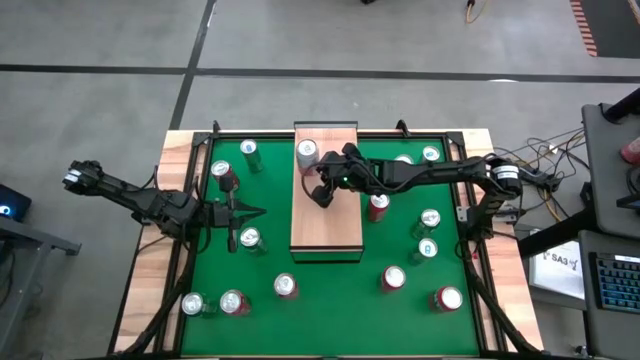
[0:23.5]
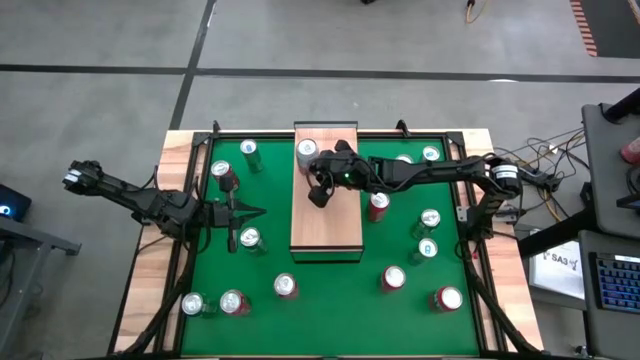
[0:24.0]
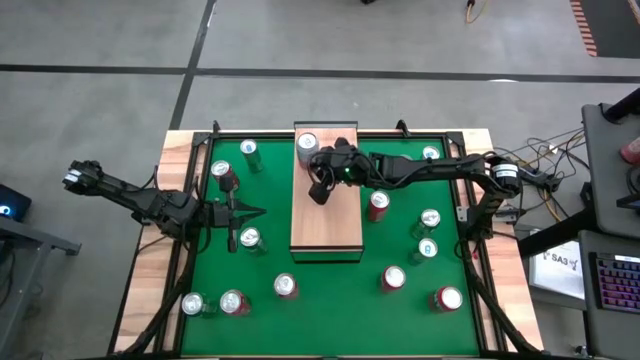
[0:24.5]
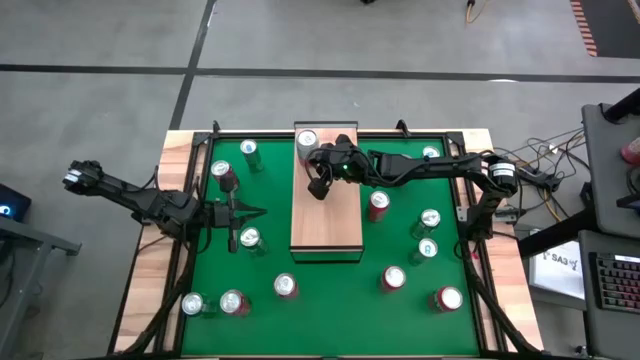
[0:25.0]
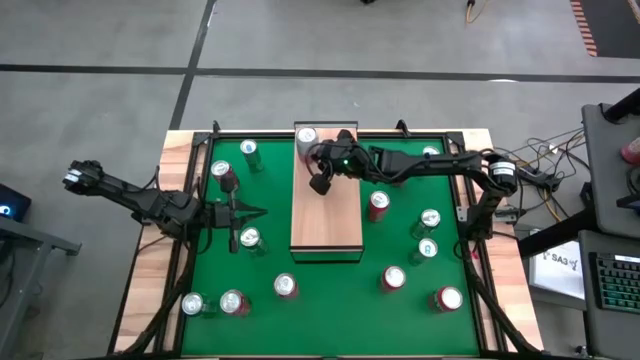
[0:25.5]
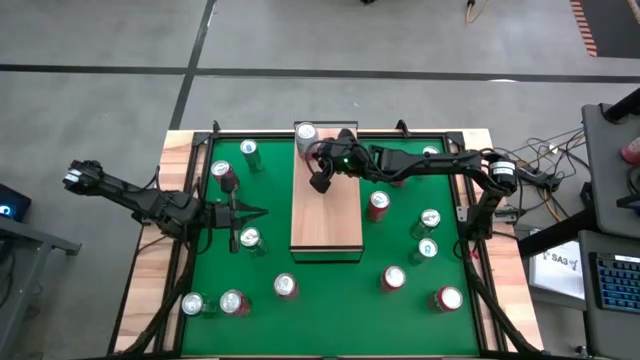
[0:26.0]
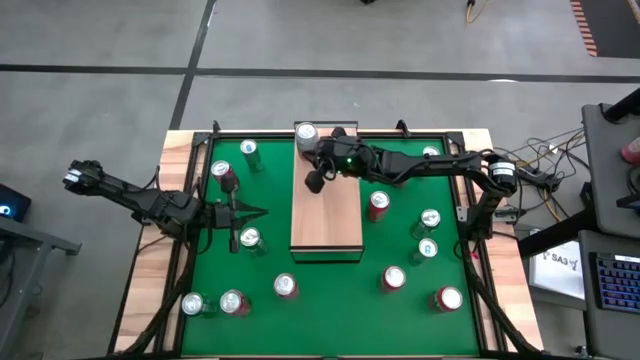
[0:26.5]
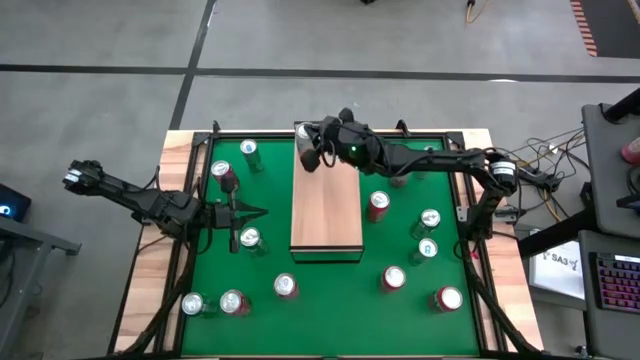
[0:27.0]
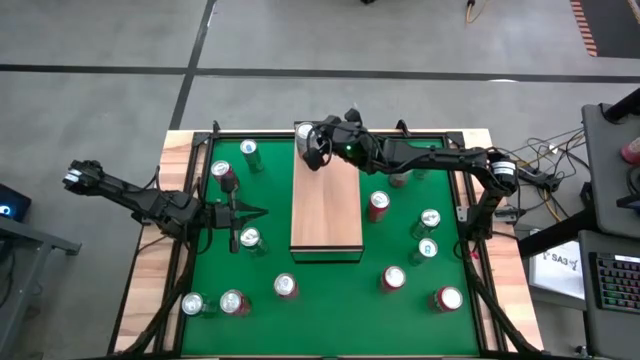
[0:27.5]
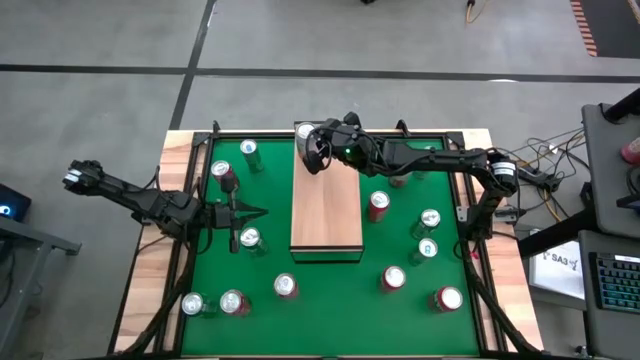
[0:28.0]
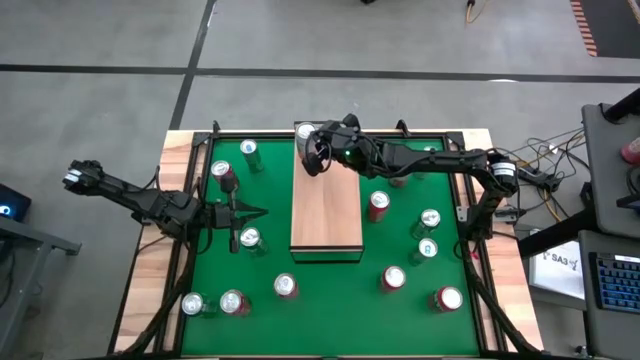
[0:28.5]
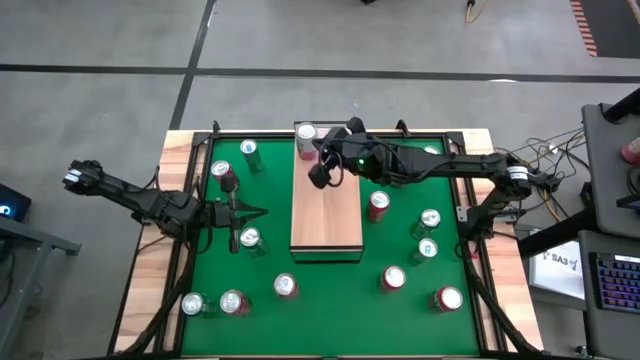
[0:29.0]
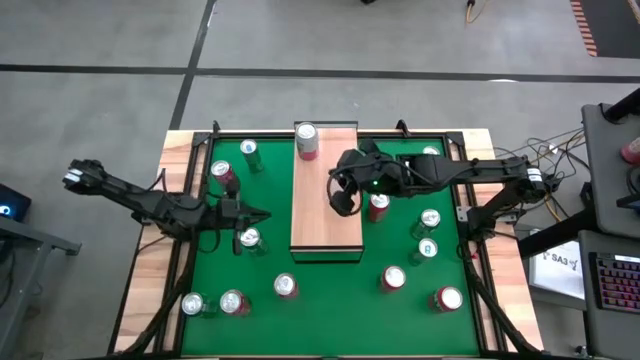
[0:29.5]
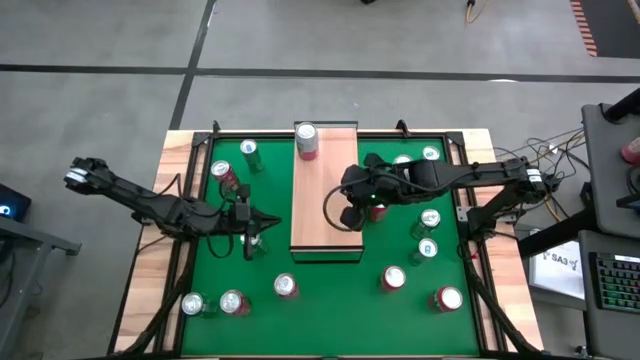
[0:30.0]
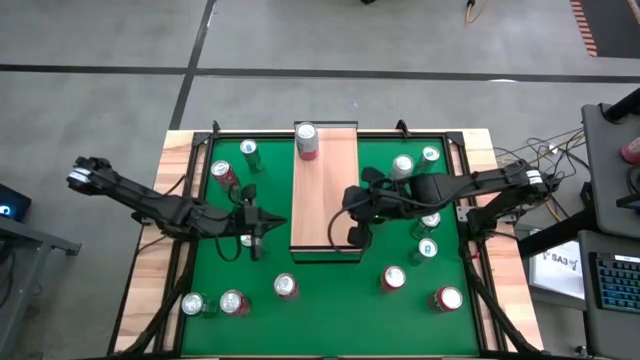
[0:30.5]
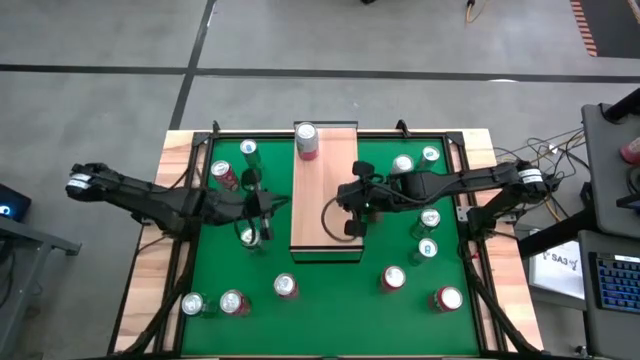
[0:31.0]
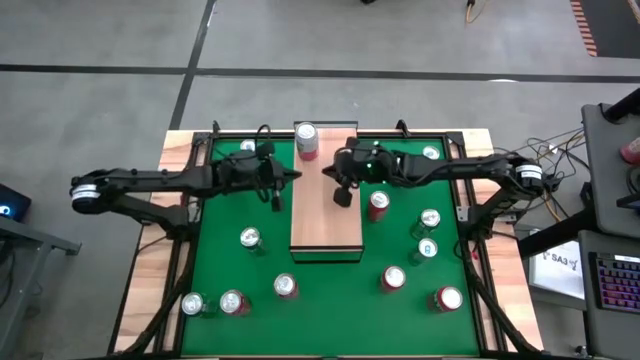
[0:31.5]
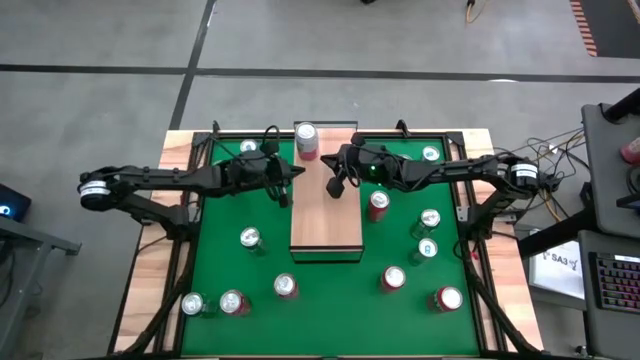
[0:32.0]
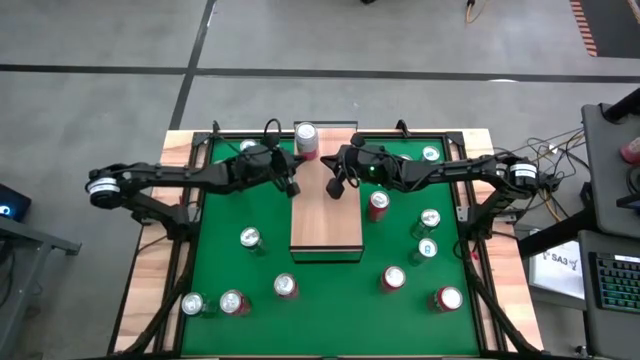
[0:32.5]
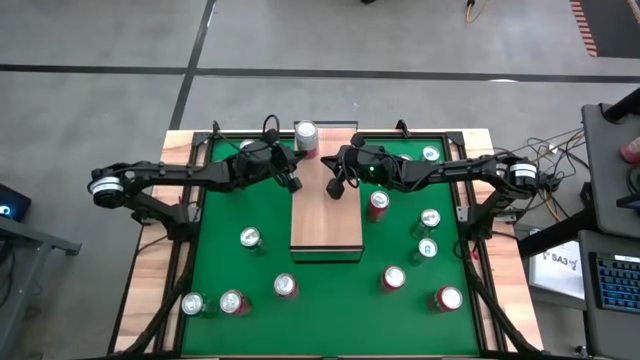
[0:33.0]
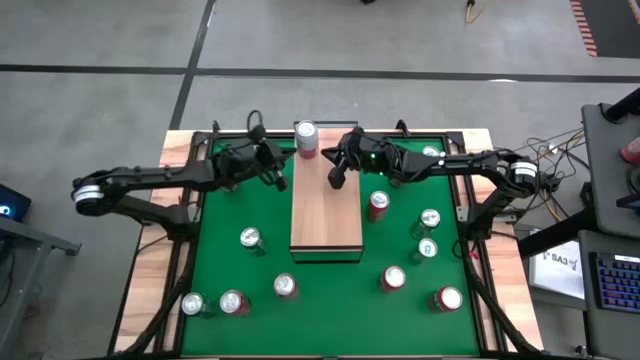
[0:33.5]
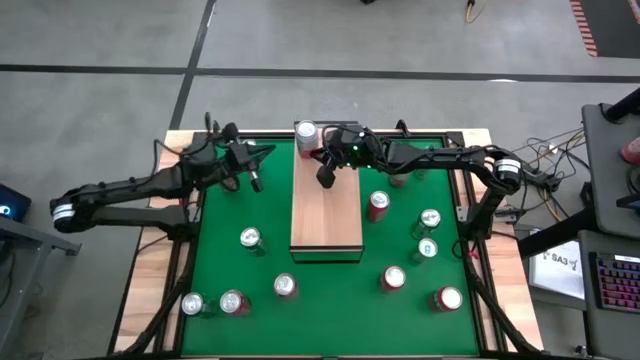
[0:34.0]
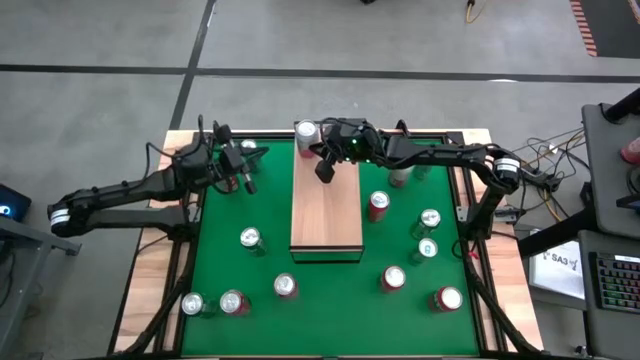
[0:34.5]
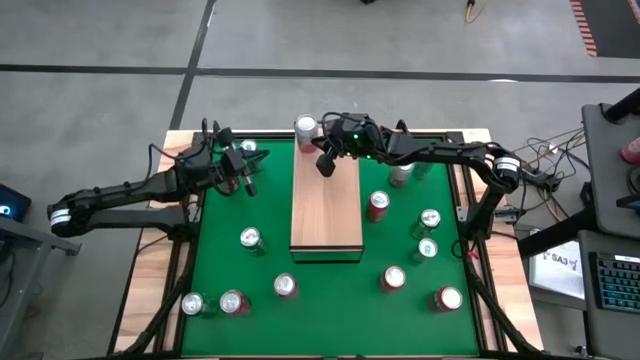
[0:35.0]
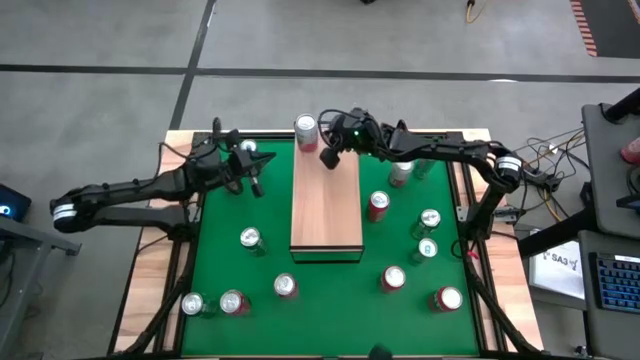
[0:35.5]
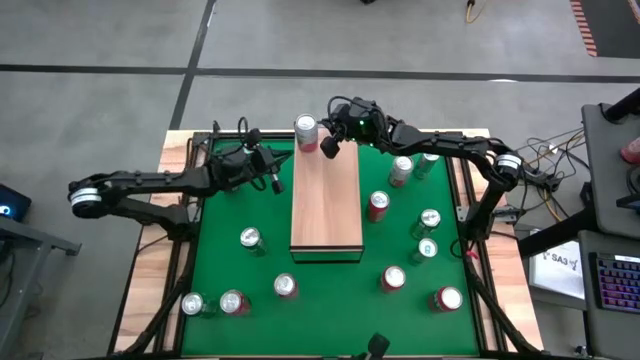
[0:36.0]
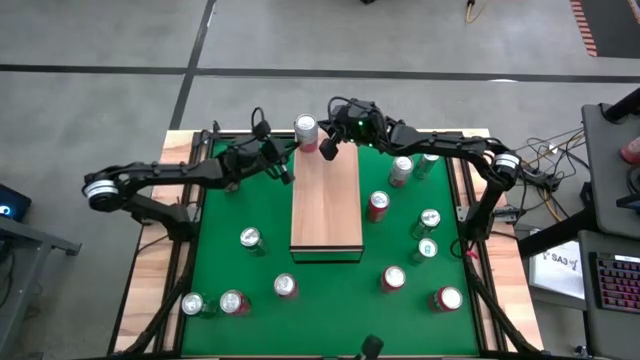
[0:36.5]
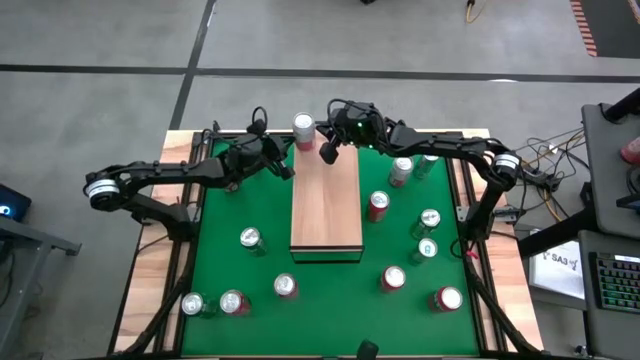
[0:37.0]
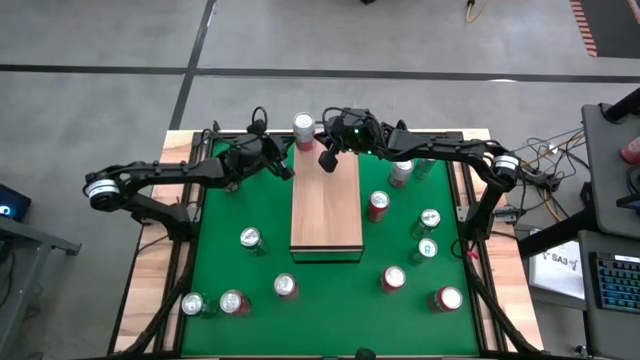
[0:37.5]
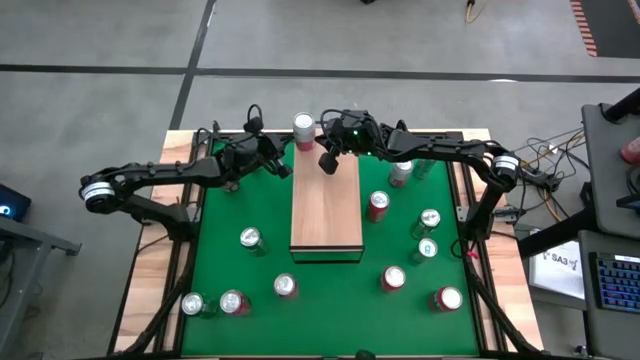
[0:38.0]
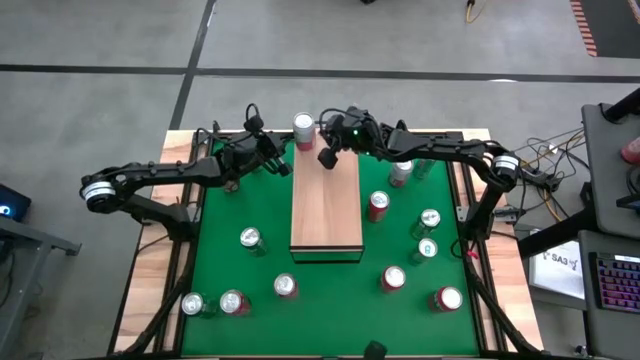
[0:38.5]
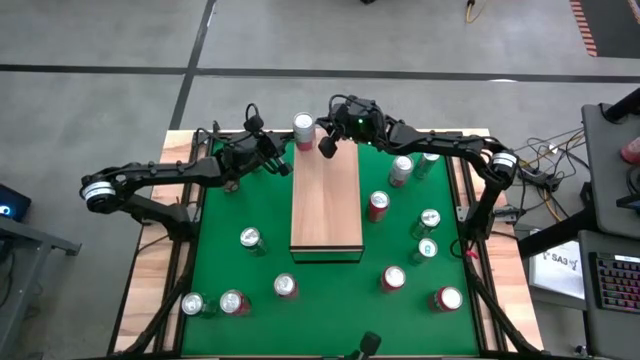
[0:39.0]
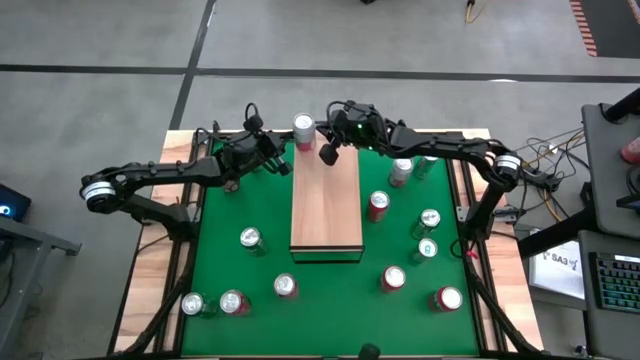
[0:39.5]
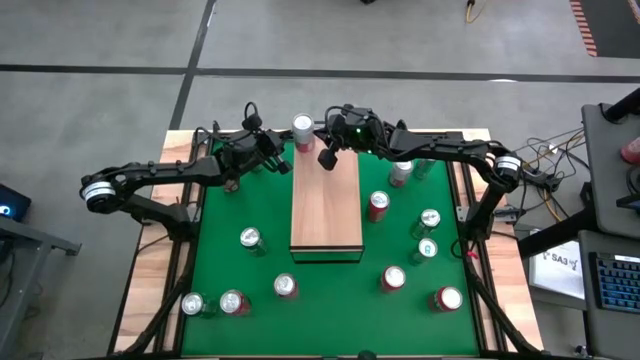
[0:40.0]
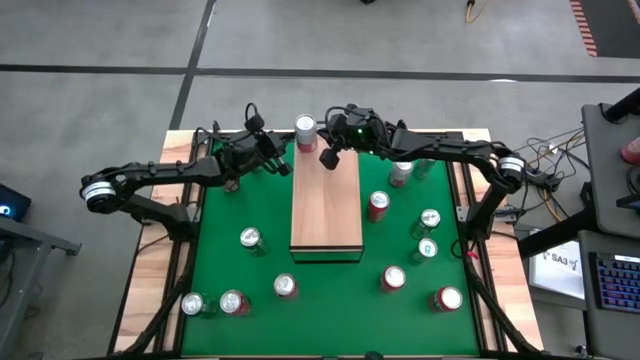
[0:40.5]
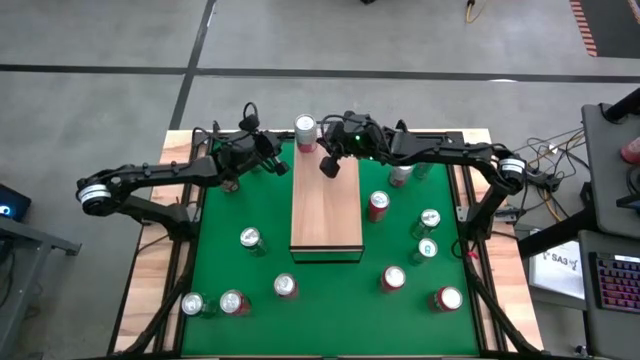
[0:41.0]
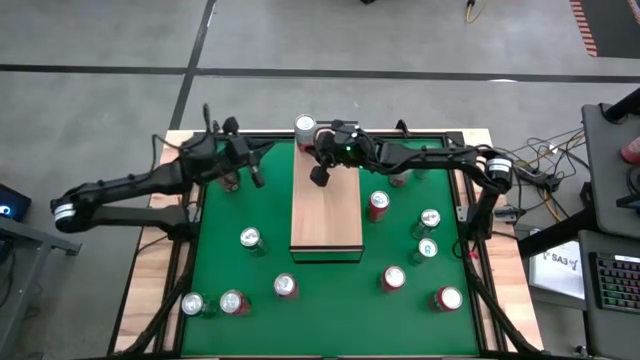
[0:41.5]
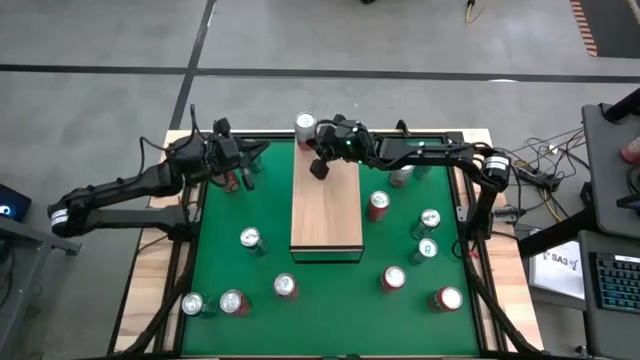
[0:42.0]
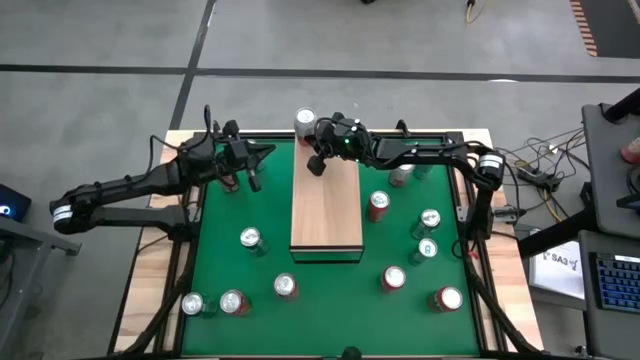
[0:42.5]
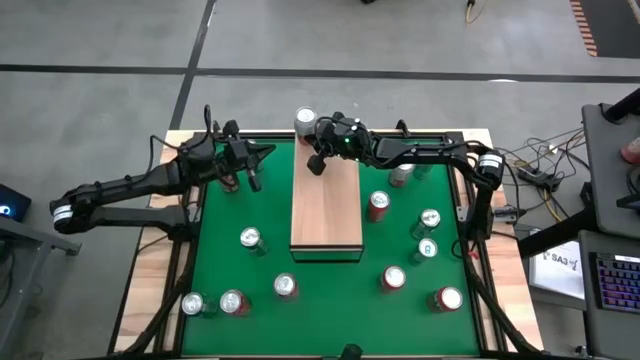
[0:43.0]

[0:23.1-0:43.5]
Task: Place canned beverage on shelf
Put the white can on the shelf
